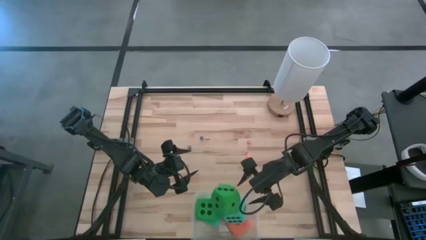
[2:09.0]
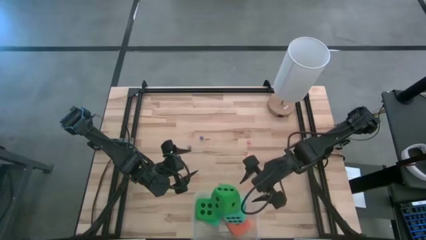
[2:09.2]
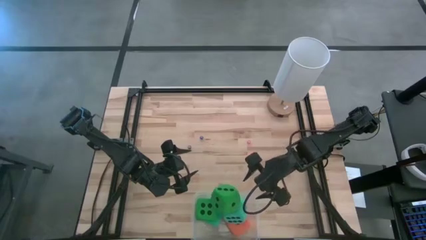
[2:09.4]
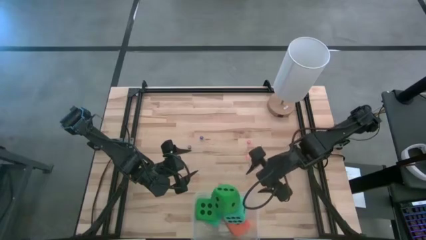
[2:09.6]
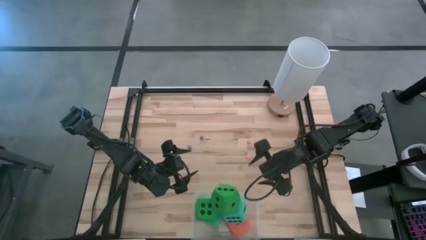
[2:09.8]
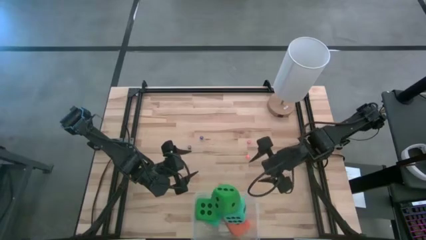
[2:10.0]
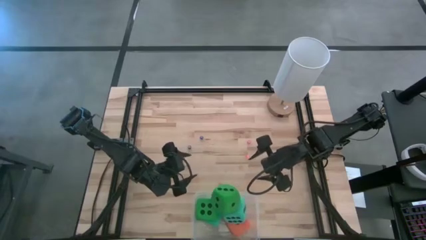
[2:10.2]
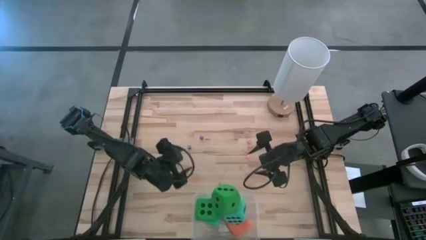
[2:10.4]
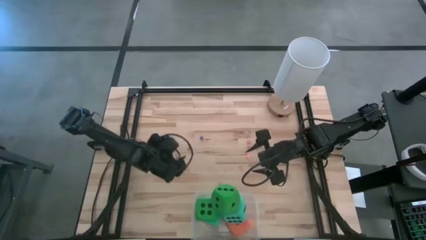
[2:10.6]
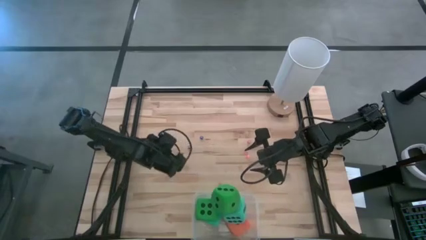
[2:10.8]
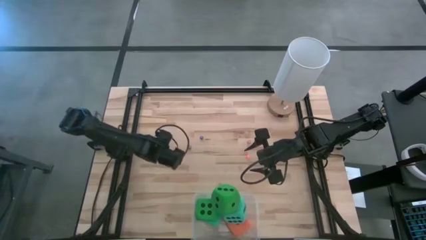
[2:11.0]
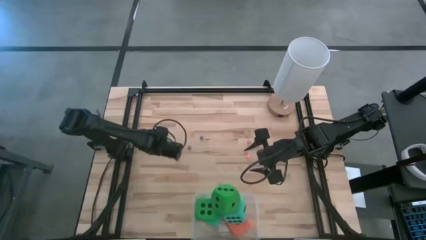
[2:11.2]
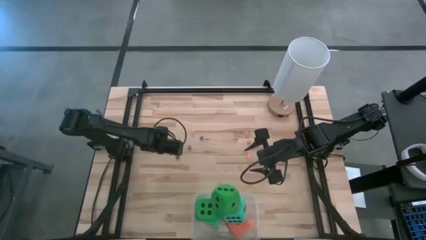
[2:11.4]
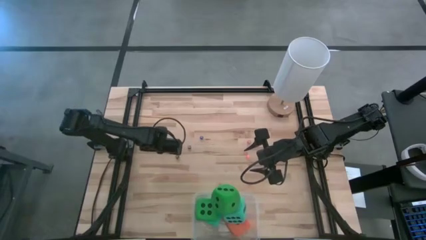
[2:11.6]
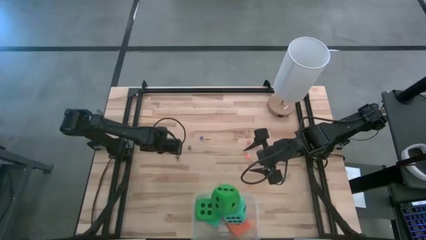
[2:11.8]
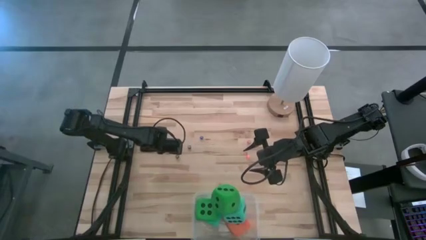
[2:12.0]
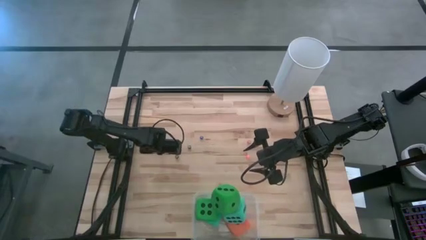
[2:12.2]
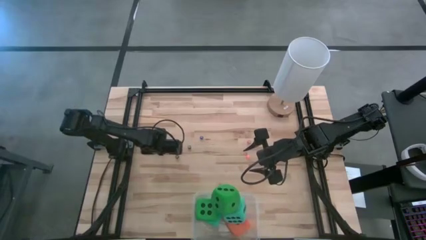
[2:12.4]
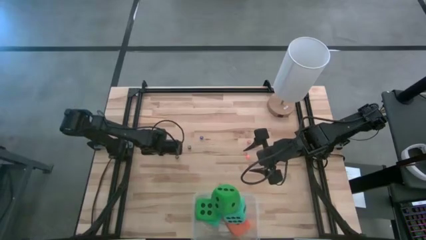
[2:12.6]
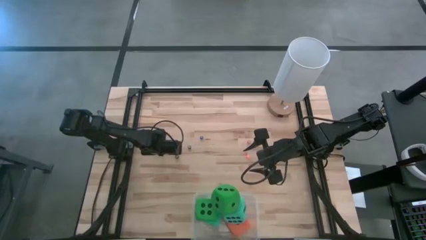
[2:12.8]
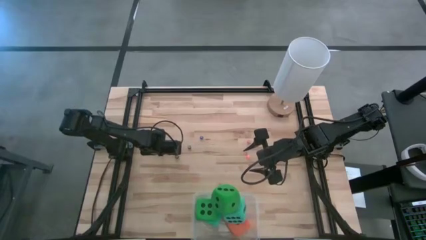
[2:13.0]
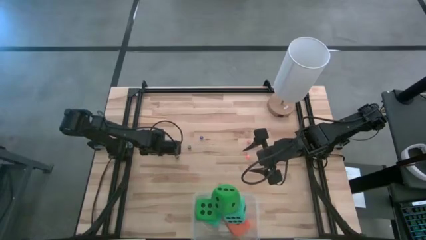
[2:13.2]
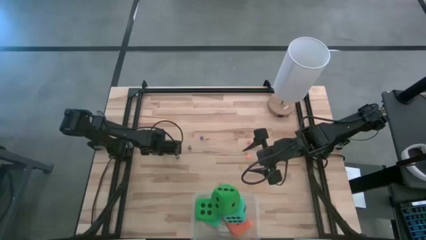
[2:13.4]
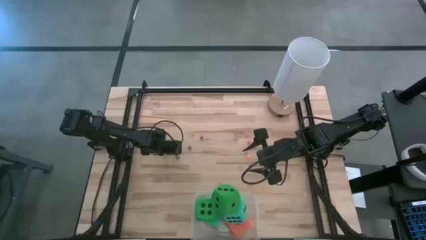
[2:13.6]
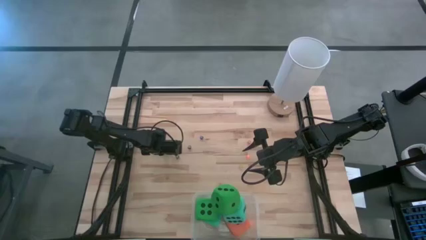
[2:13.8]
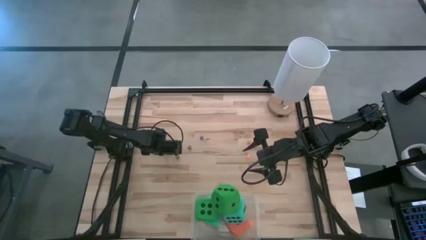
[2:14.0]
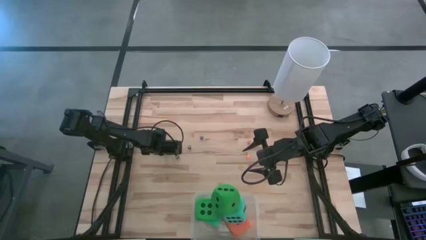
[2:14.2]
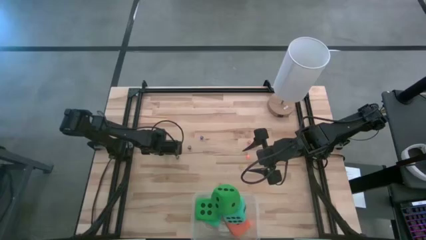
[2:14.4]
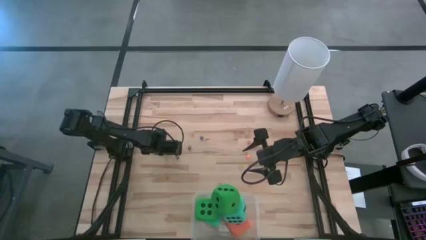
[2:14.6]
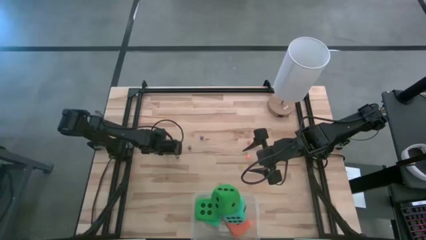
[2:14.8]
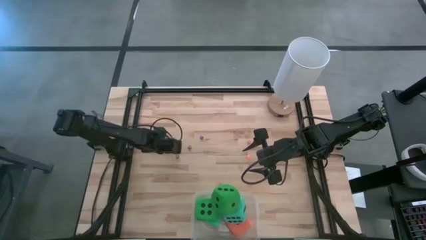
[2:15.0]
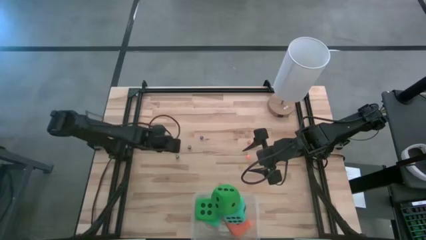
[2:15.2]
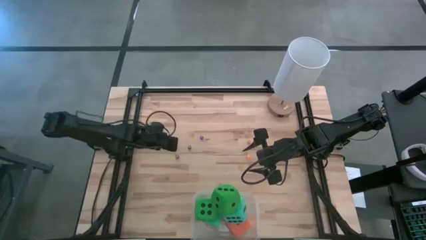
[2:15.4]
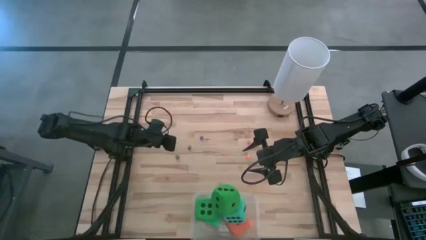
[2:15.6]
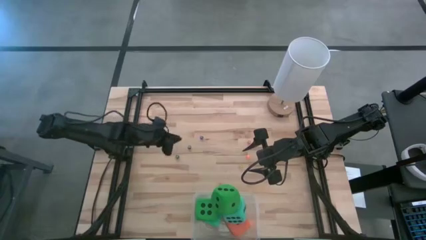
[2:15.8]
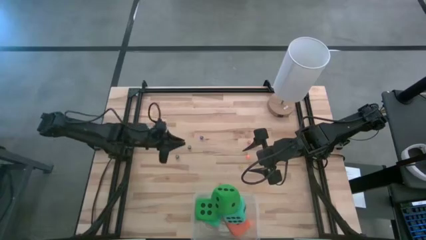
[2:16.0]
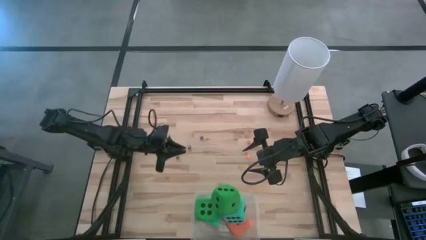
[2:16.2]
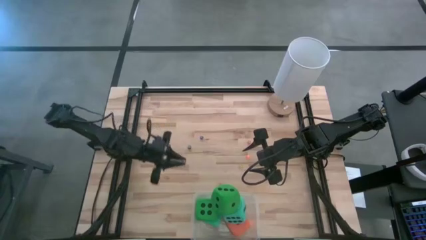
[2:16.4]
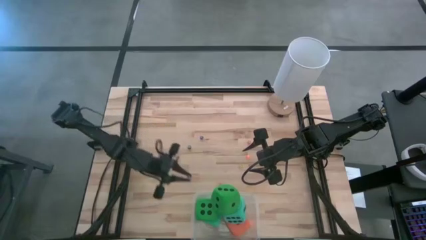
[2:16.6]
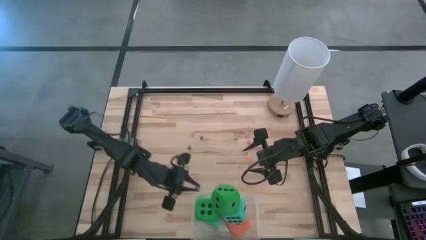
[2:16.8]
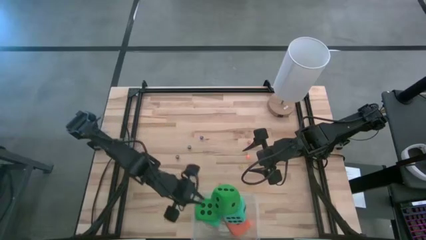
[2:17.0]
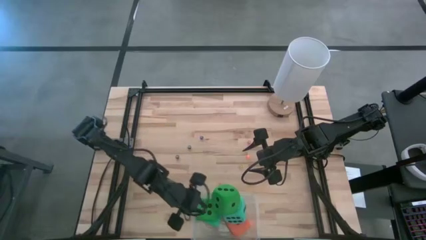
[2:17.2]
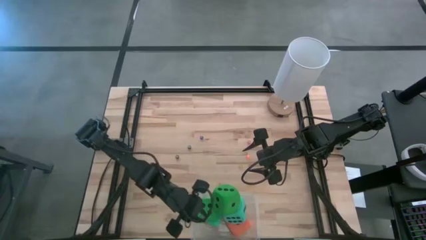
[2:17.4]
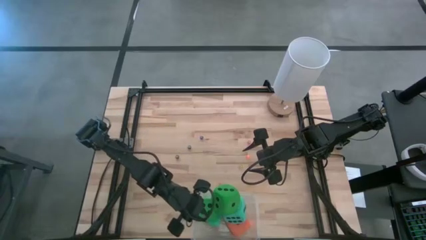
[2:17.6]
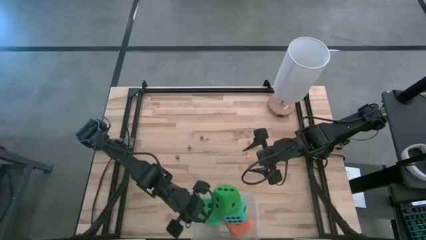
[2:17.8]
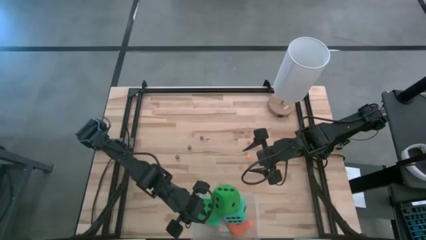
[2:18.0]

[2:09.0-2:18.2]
Task: Pick & Place Dice
Put the small purple dice into the transparent bin

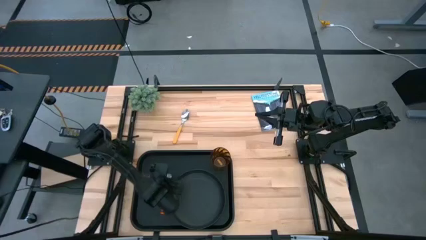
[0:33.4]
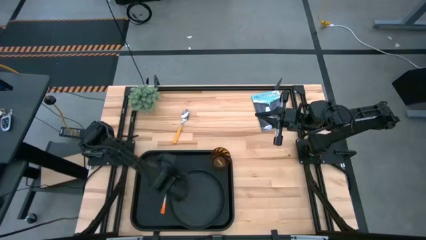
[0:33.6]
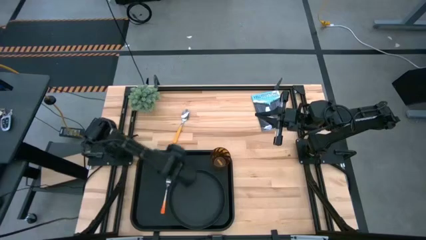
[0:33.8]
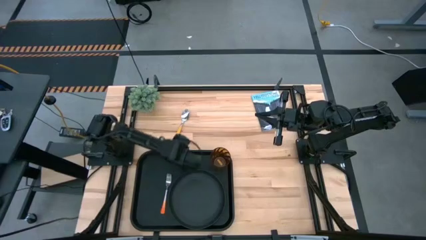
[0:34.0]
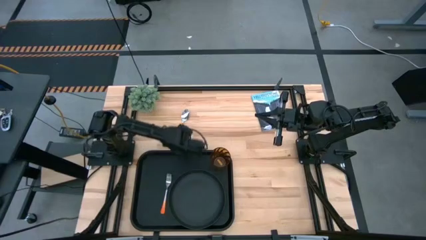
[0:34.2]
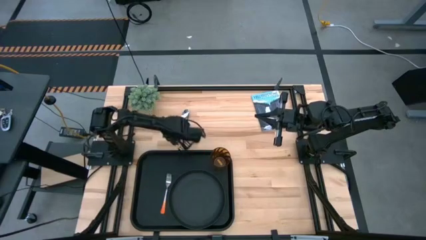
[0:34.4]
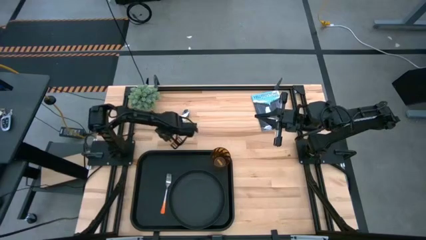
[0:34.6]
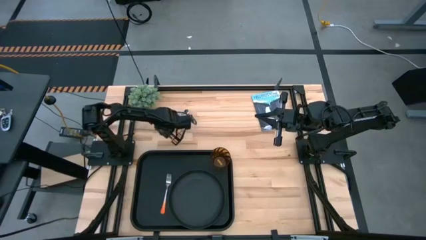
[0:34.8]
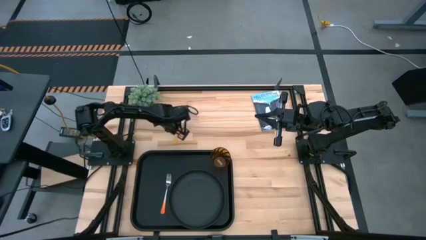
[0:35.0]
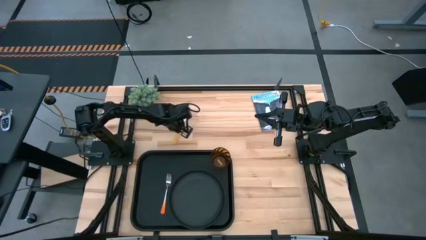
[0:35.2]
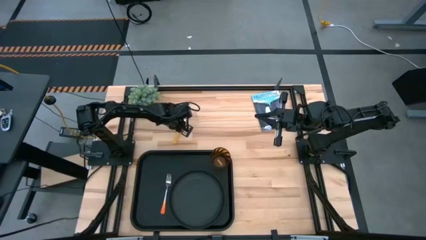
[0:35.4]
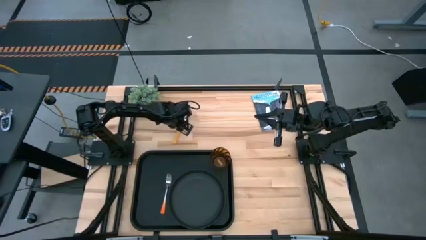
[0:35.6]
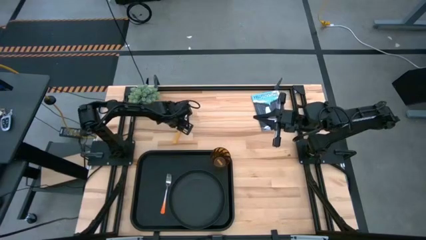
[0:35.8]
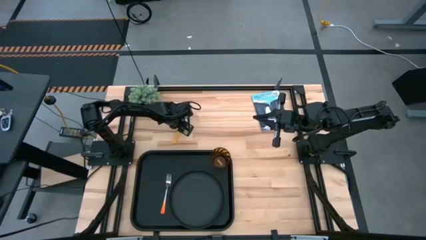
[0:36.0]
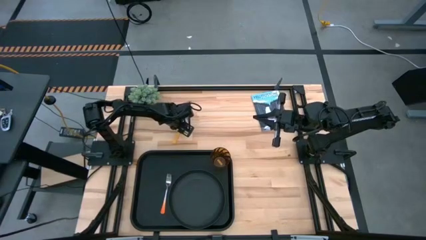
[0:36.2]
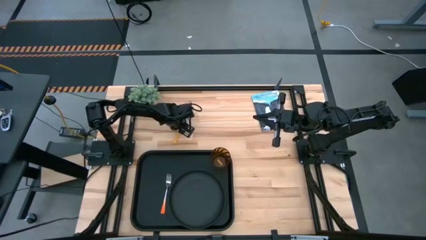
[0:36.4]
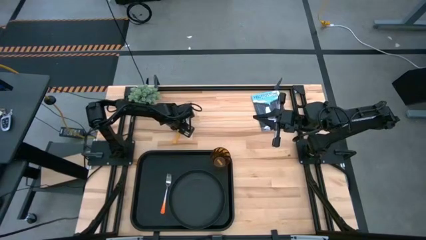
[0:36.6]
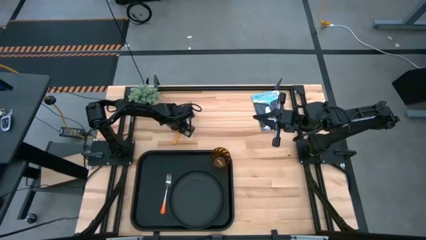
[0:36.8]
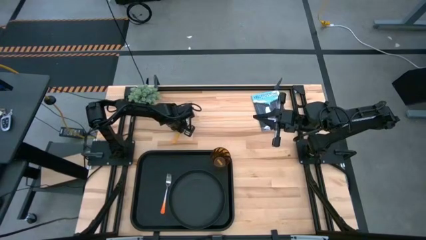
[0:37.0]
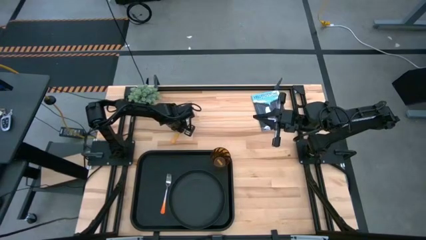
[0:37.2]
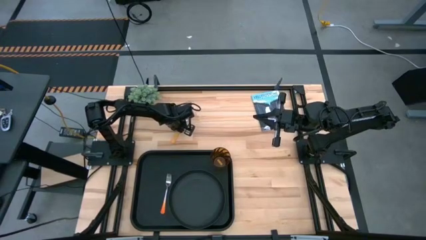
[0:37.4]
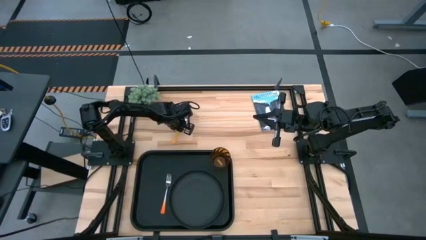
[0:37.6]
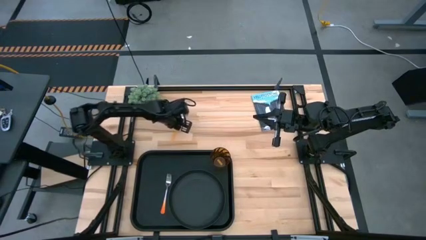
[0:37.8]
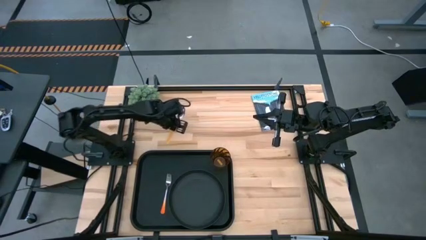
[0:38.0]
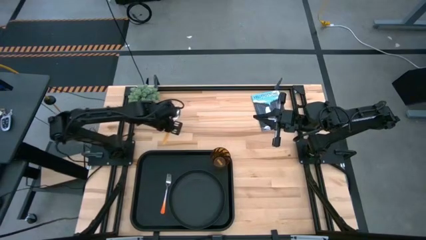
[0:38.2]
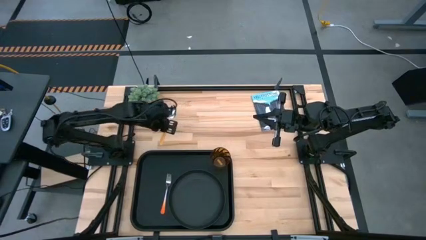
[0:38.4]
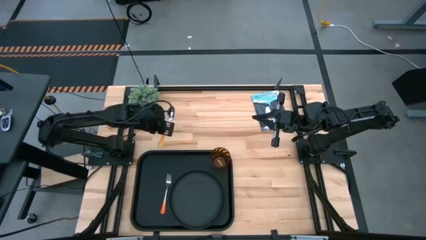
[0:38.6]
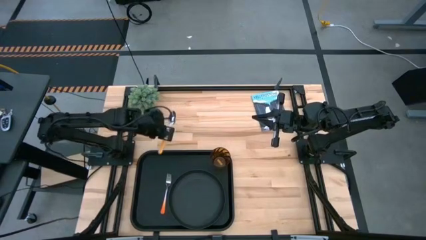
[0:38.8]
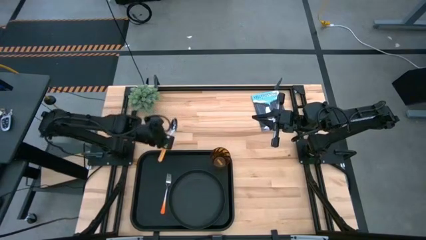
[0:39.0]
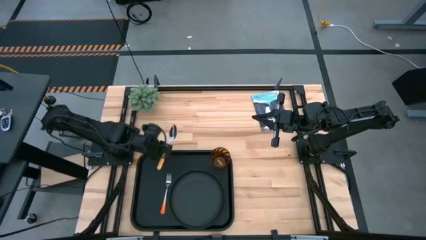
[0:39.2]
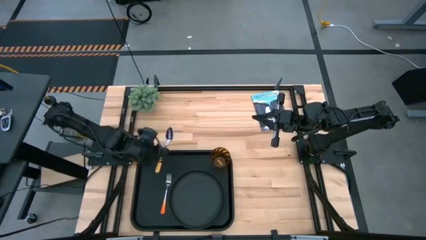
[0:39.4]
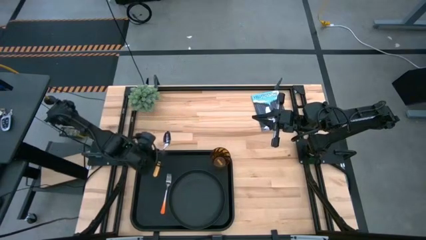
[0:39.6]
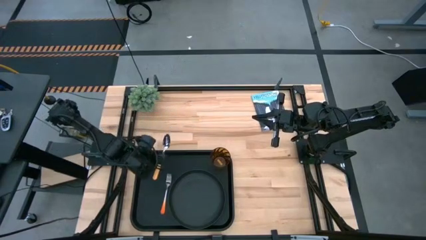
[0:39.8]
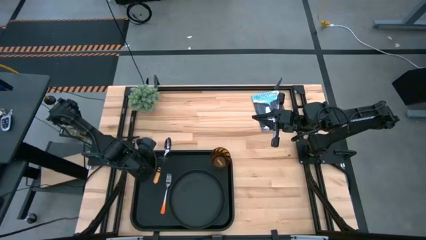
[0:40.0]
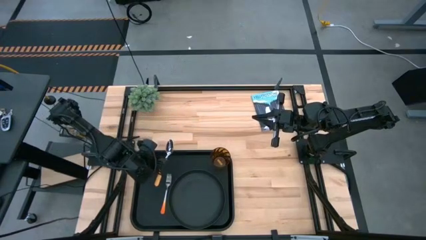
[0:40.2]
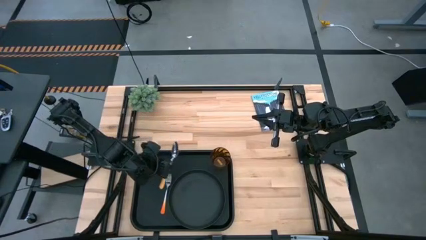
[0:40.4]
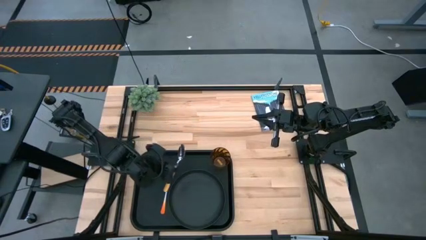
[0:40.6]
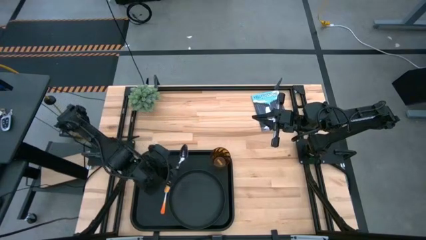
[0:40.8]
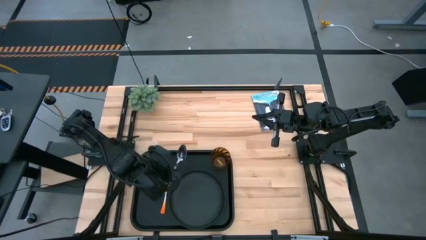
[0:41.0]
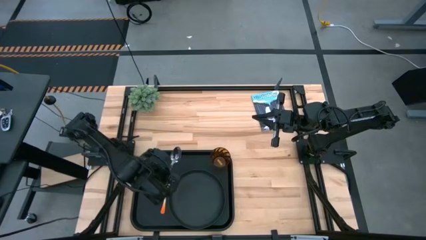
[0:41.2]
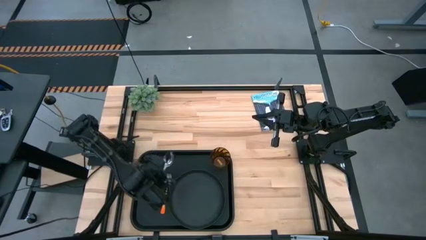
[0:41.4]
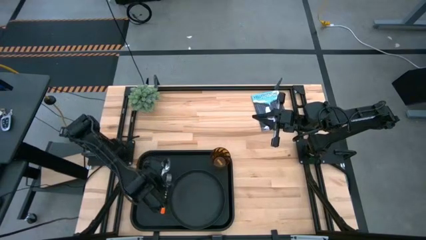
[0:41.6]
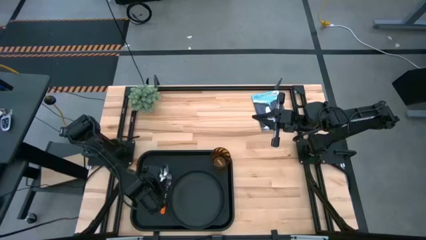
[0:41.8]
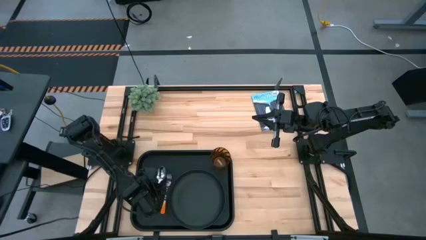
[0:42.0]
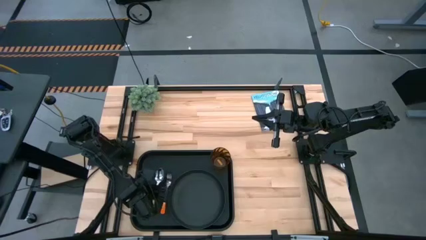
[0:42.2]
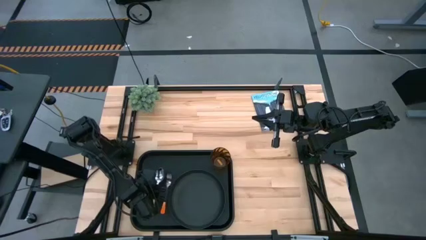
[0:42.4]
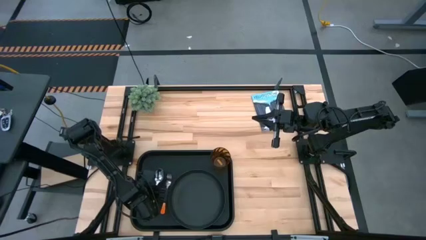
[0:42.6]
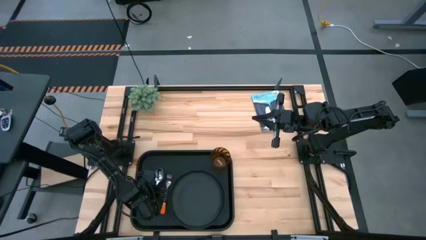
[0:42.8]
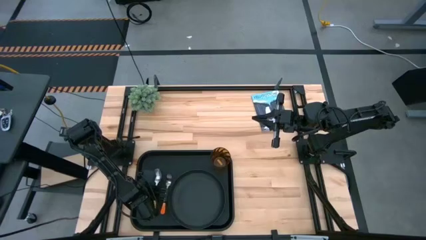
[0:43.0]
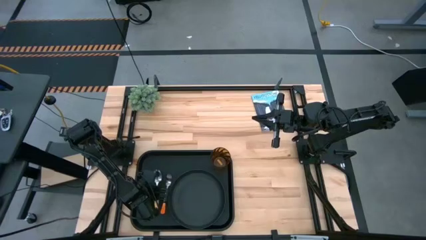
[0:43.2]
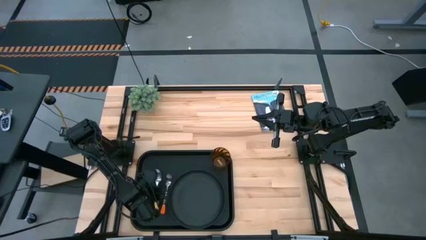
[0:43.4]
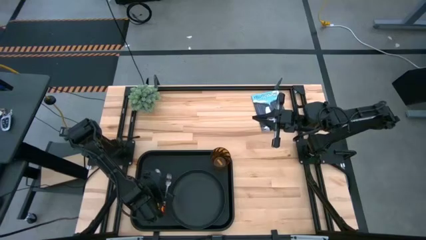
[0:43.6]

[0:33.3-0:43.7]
Task: Pick and place plate/cup/fork/spoon on tray
Put the yellow spoon on the black tray to the left of the orange fork
